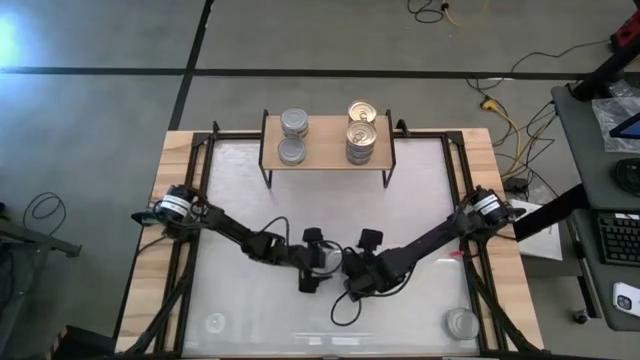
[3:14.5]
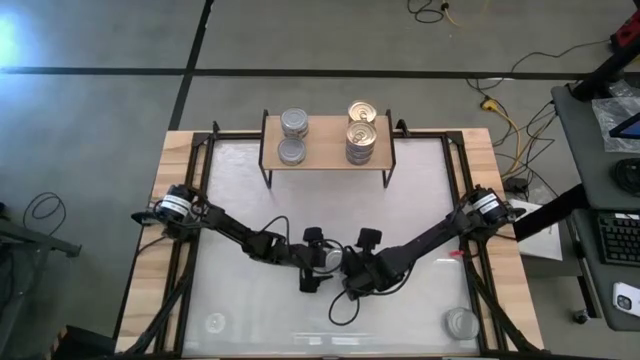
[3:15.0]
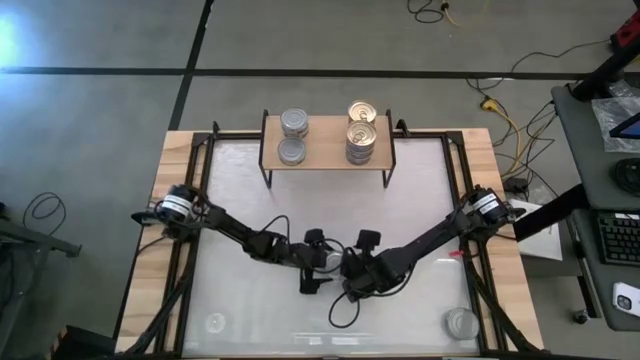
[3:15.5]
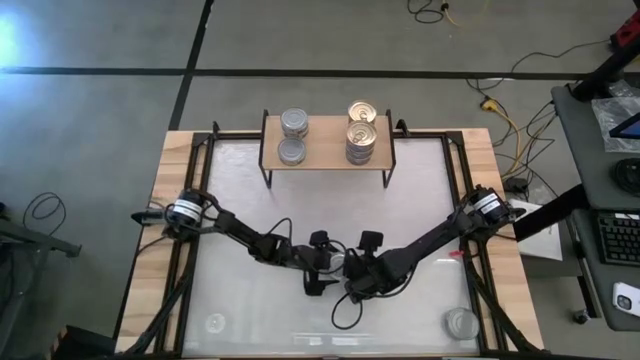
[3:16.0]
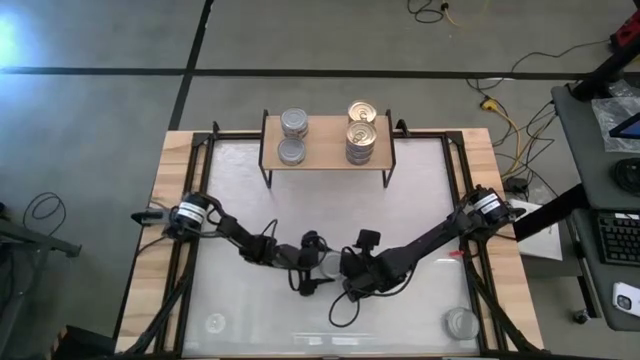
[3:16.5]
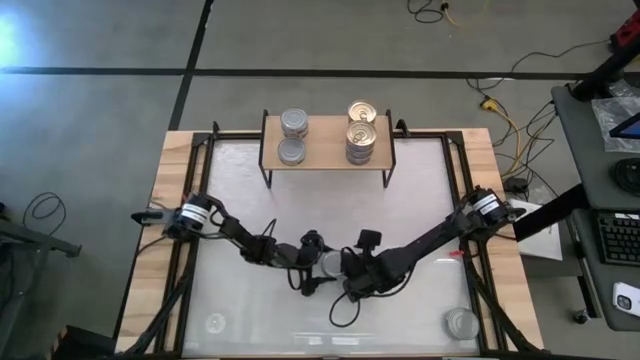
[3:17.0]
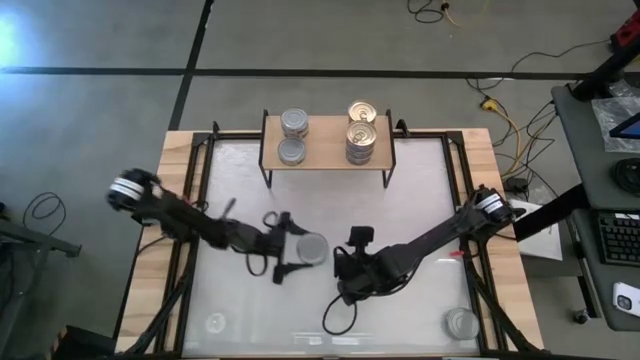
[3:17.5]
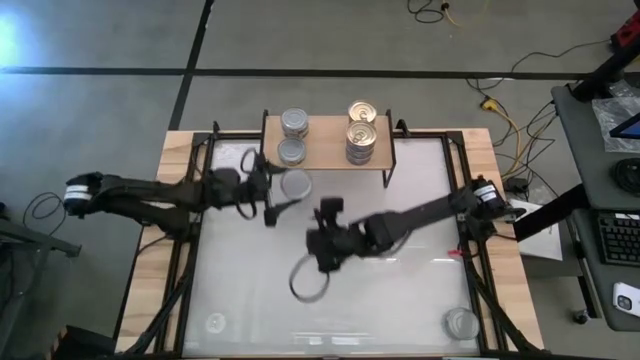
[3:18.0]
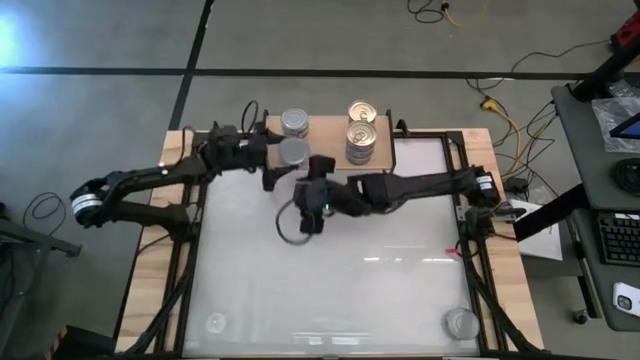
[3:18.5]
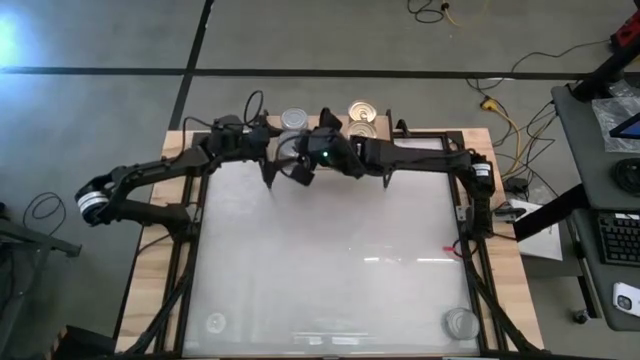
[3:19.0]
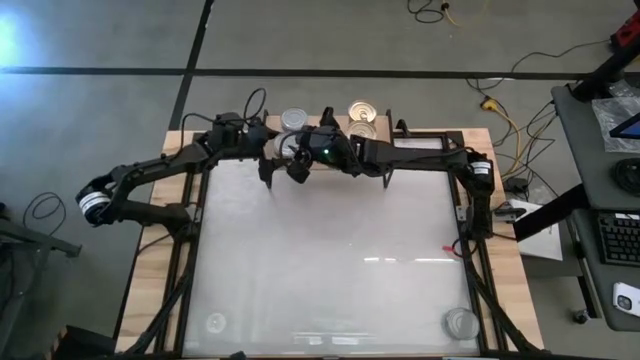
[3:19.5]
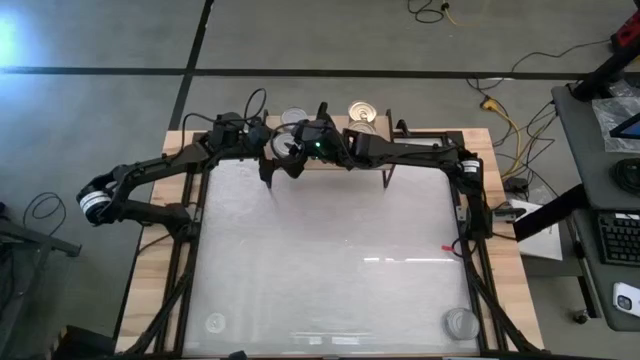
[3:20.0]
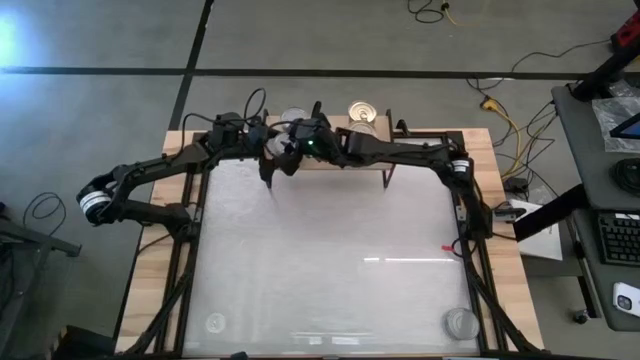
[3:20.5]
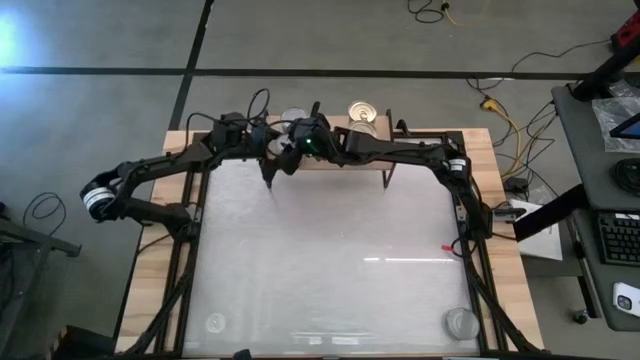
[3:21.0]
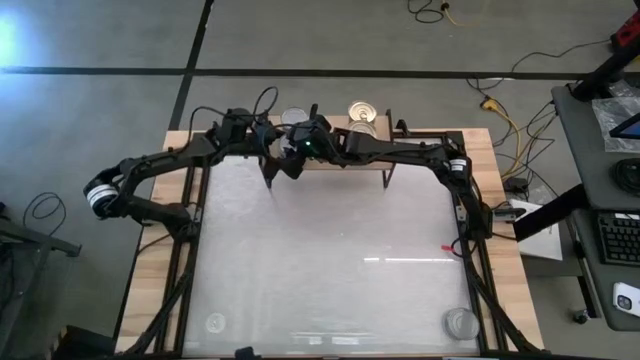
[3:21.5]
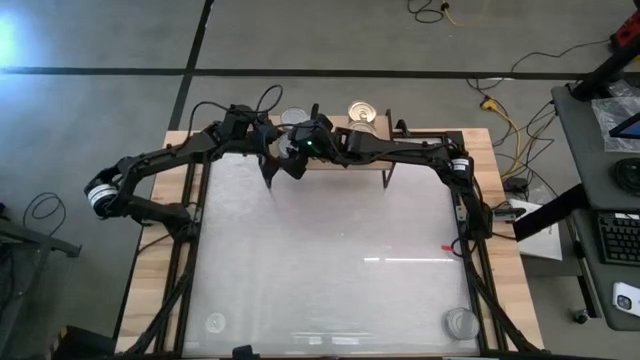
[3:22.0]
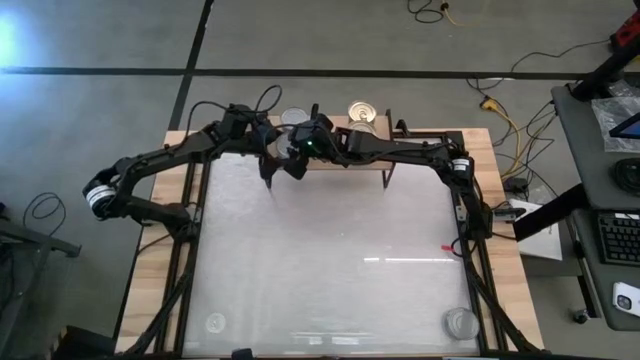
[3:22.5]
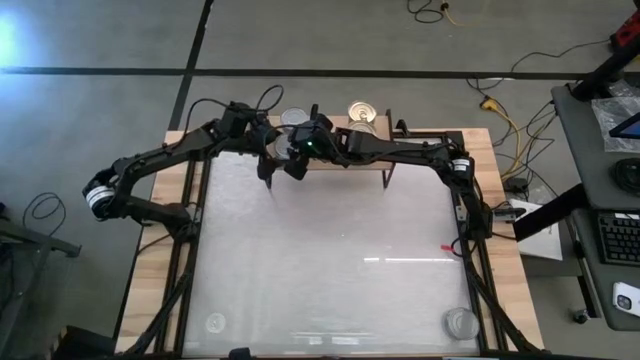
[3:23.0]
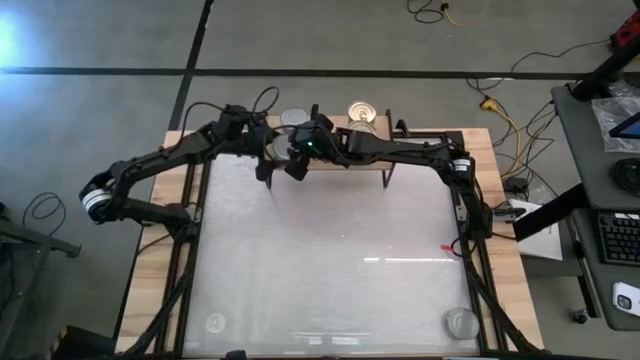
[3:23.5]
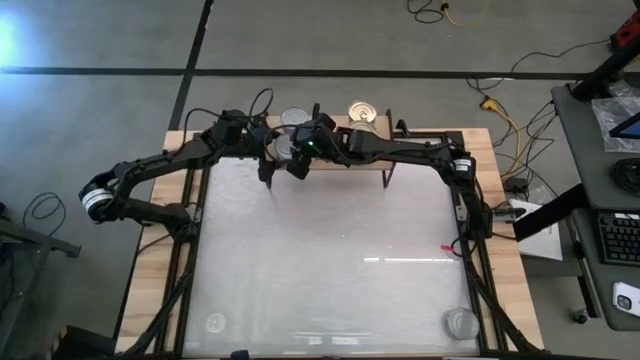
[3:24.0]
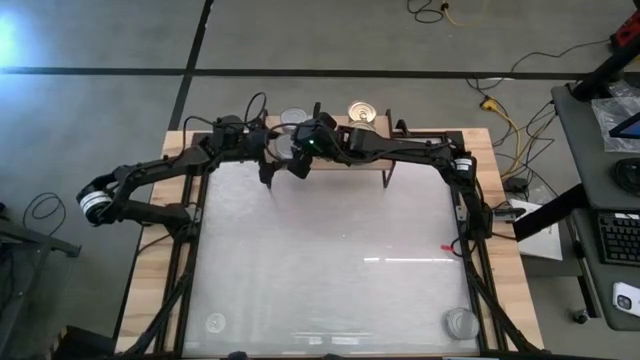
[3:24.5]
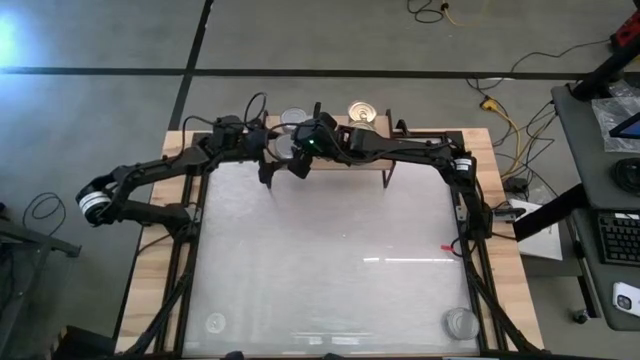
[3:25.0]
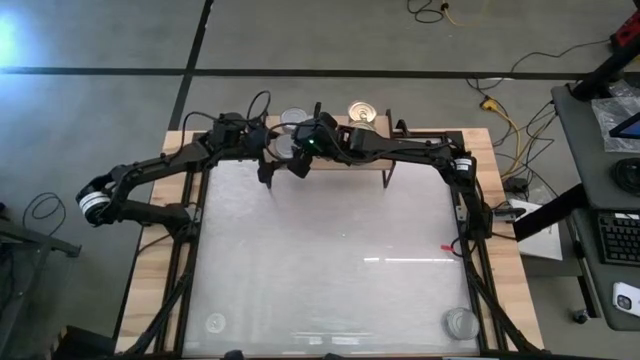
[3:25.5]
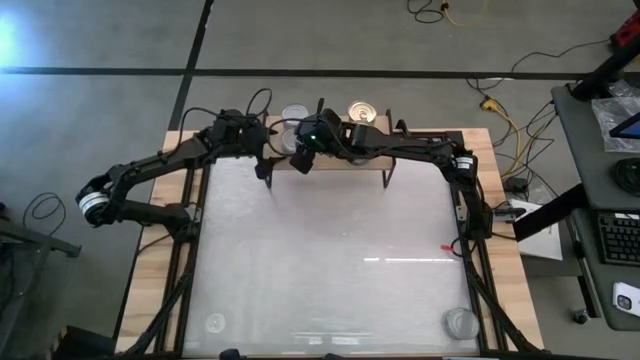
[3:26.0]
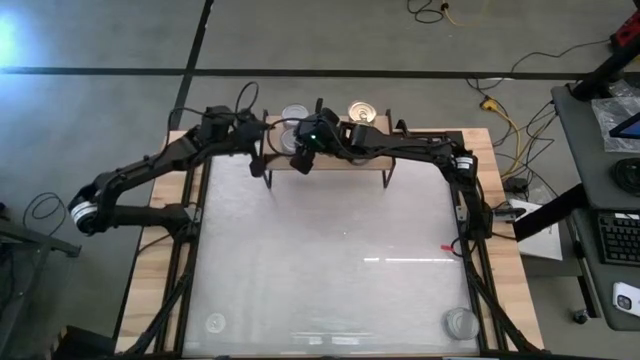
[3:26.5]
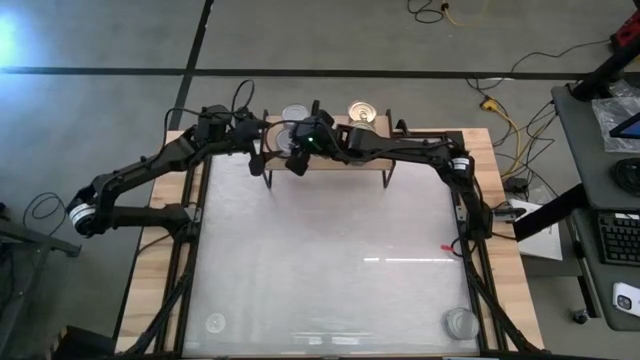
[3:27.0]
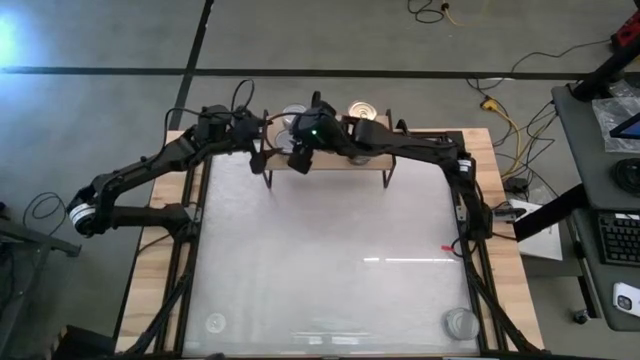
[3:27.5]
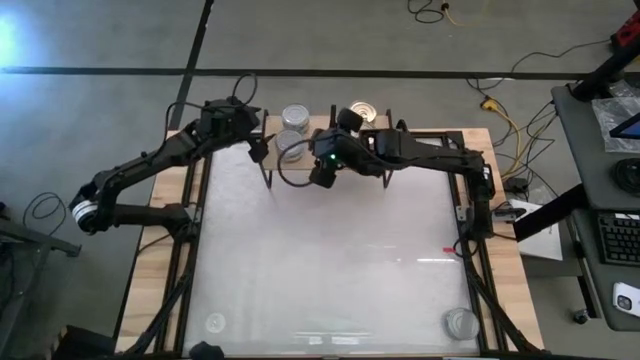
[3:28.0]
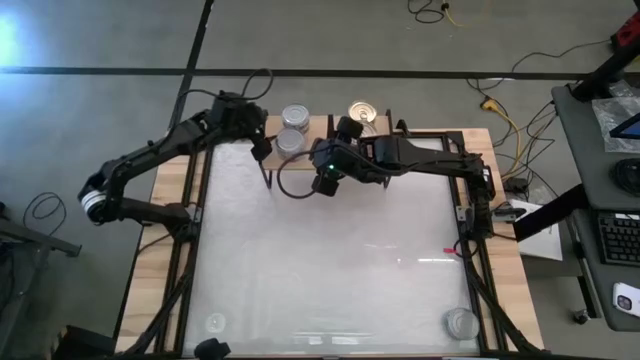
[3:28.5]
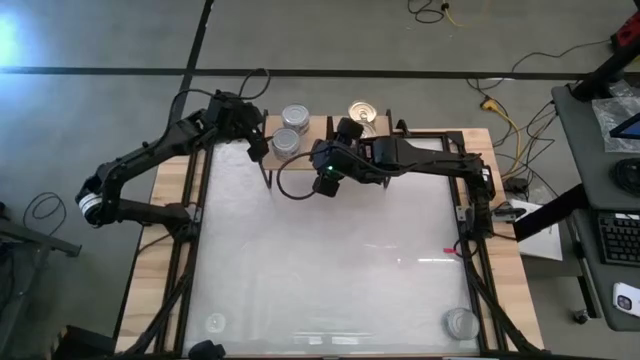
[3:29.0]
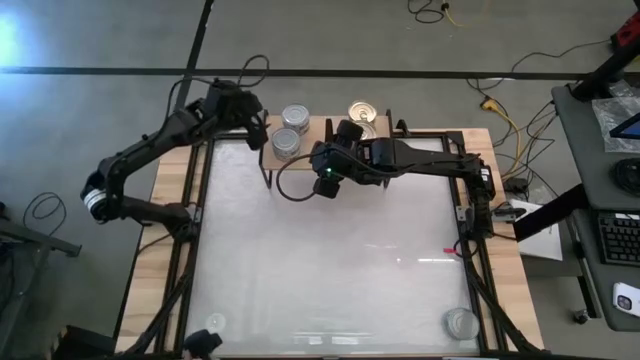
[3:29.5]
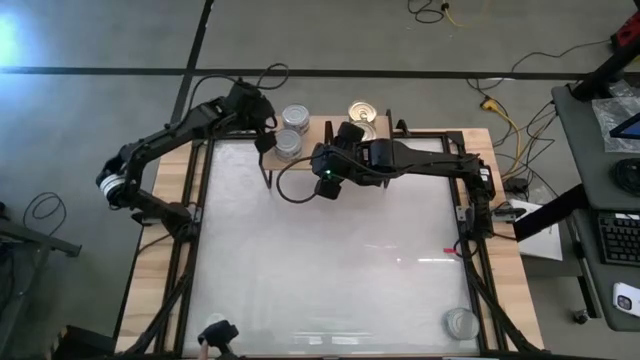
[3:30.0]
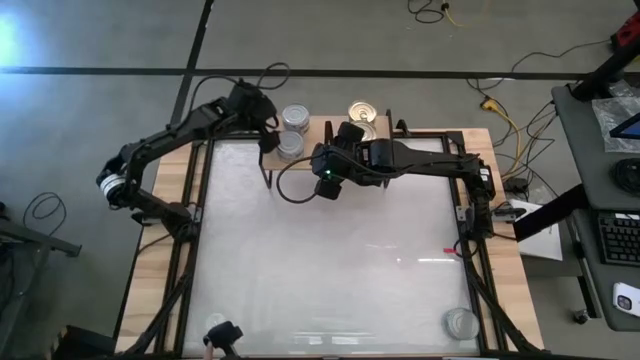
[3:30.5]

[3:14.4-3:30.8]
Task: Stack canned seafood by type on shelf
Stack the green tuna can on top of the green tuna can on the shelf

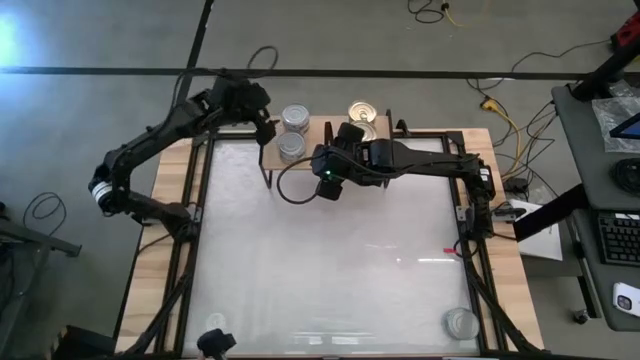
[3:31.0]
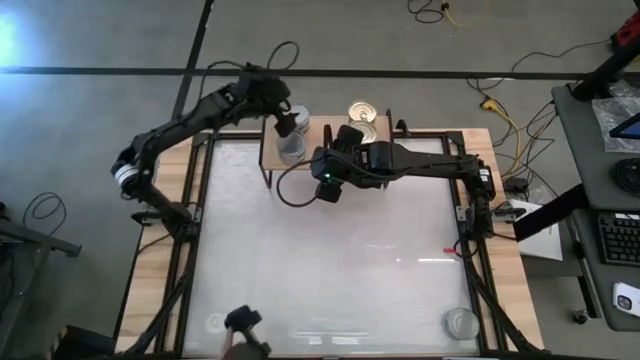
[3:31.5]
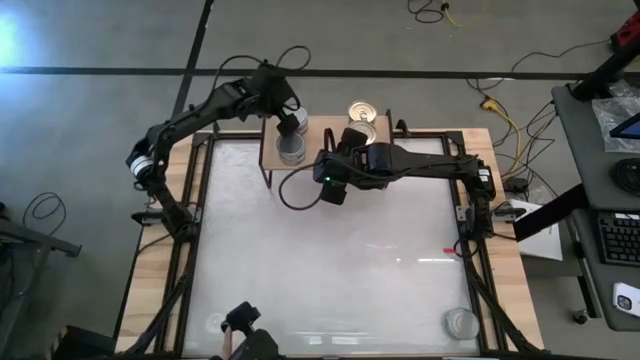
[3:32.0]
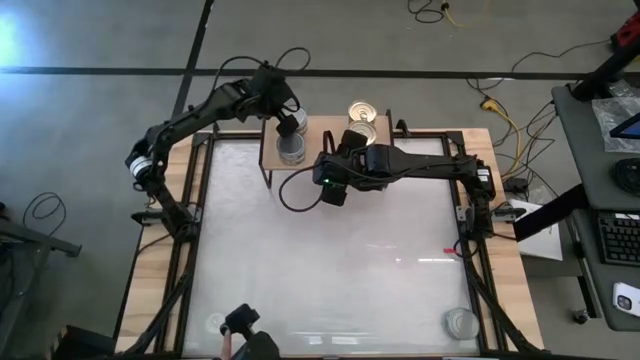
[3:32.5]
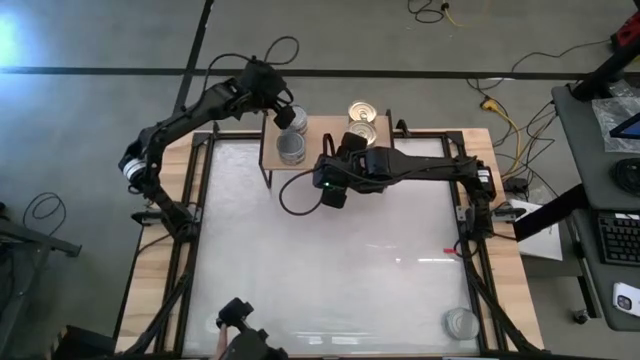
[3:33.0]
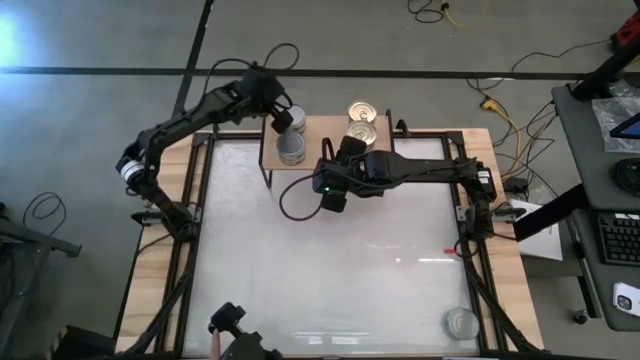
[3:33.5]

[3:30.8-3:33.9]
Adjust the green tuna cans on the shelf

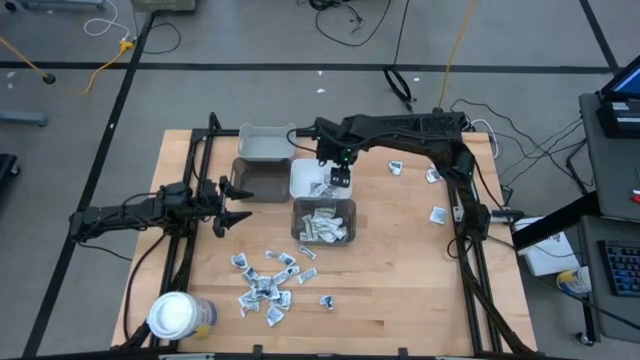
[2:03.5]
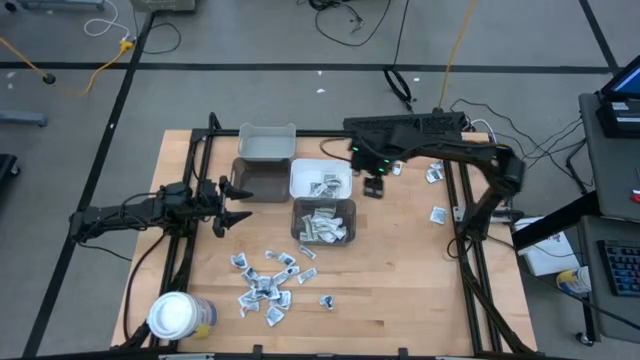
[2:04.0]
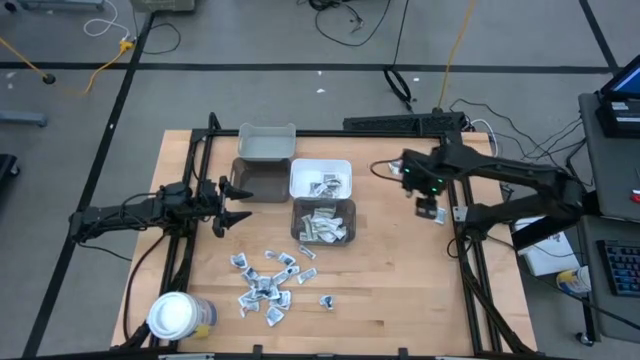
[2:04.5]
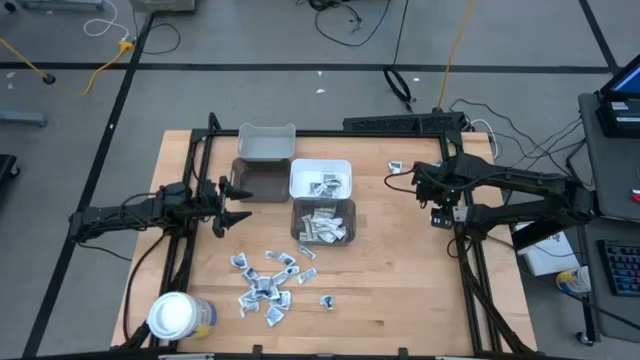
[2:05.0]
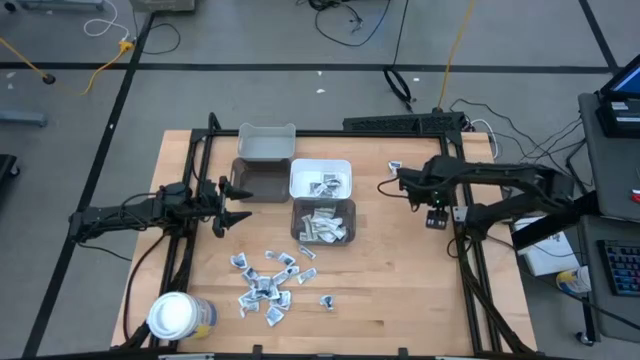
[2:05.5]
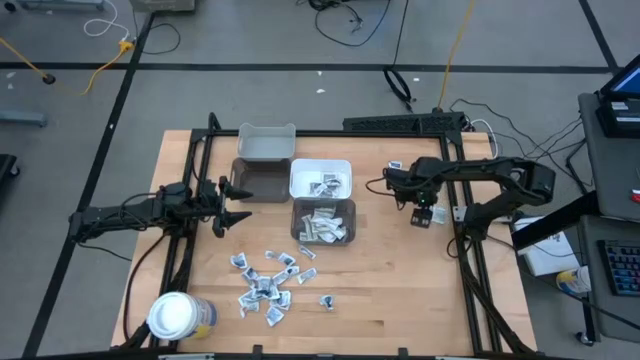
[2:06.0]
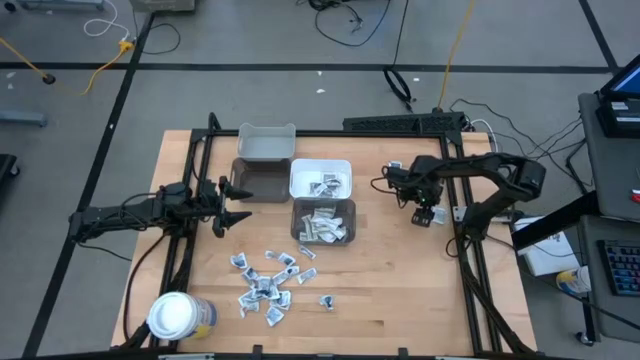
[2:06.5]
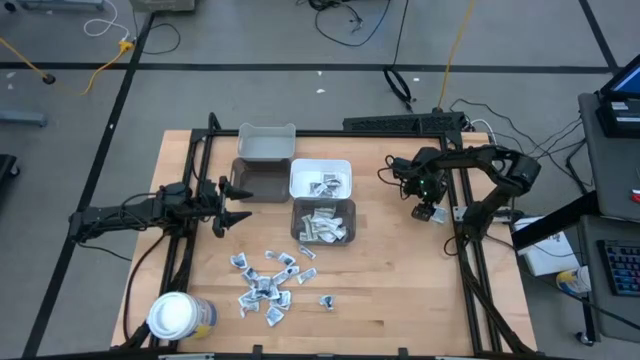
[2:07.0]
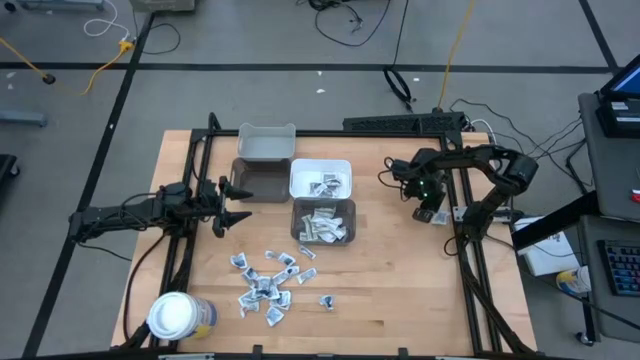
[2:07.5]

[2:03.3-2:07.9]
Task: Pick & Place First Aid Supplies
Put the gray towelette pack into the white bin
